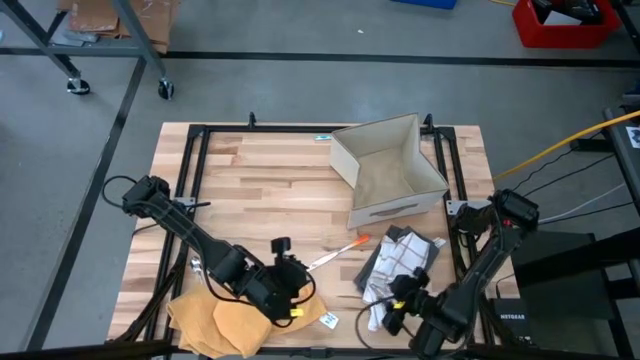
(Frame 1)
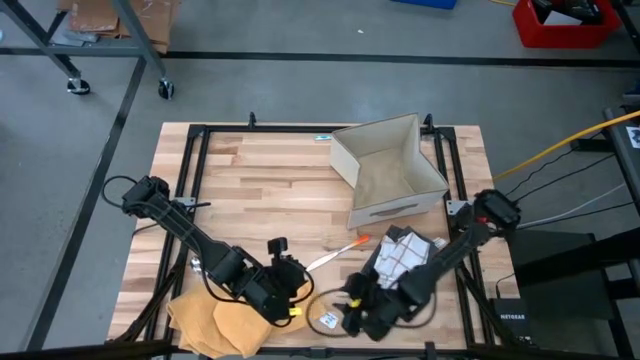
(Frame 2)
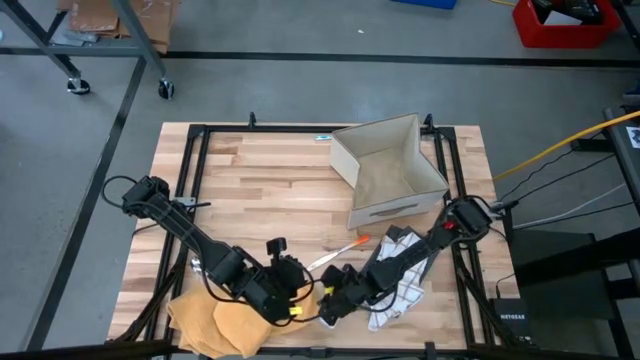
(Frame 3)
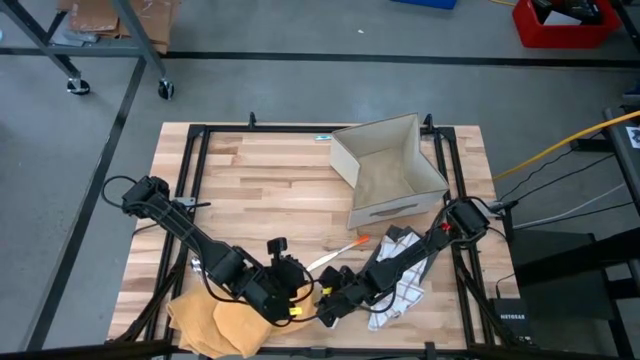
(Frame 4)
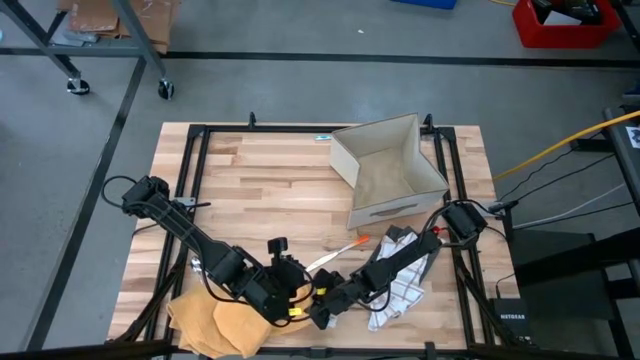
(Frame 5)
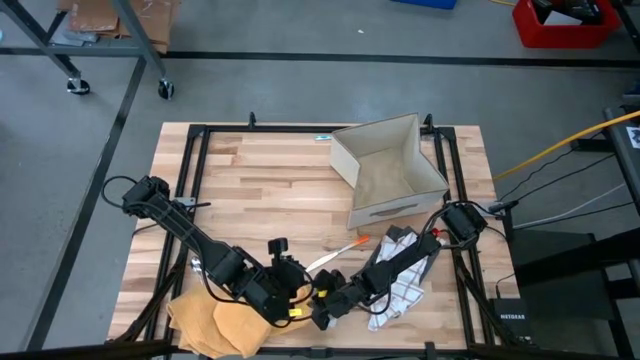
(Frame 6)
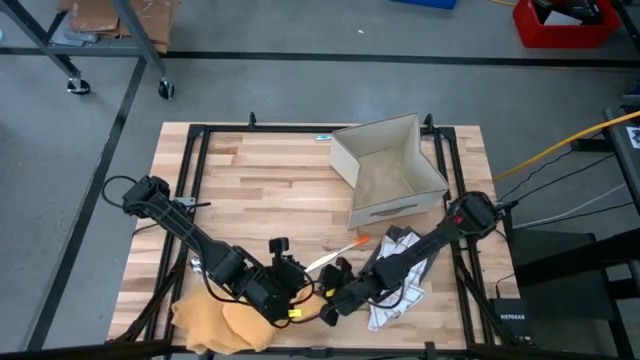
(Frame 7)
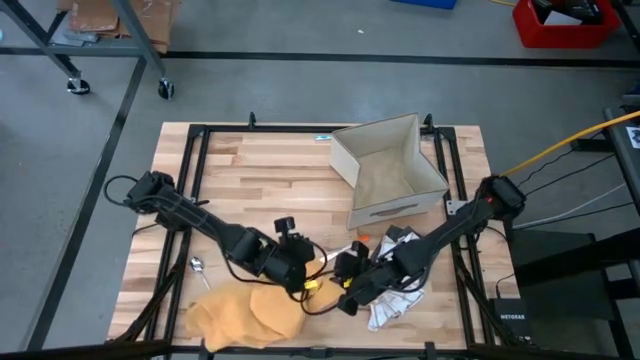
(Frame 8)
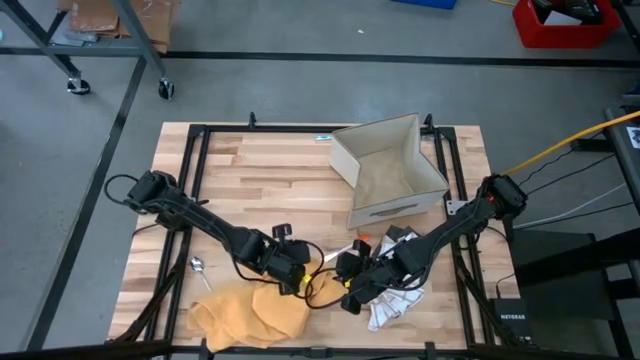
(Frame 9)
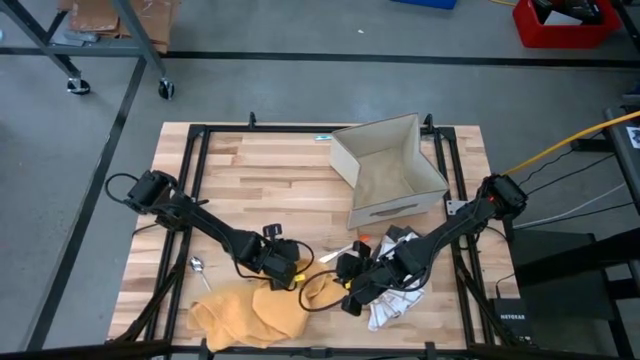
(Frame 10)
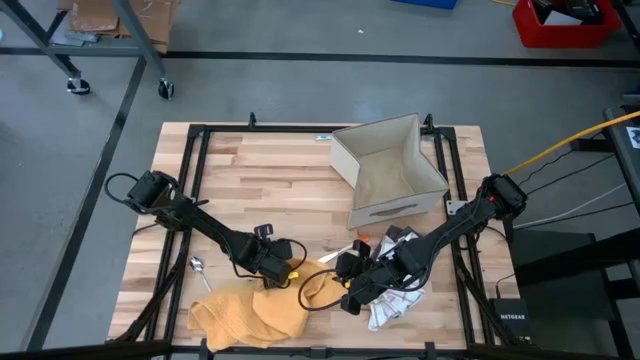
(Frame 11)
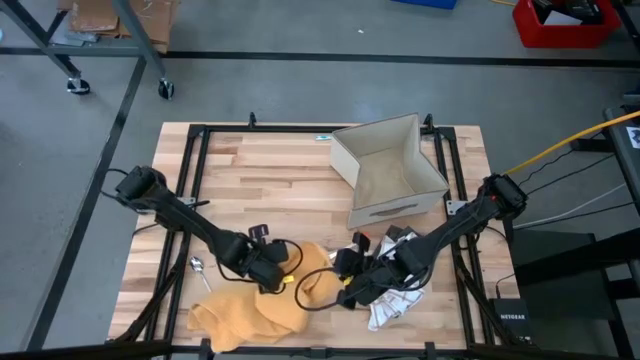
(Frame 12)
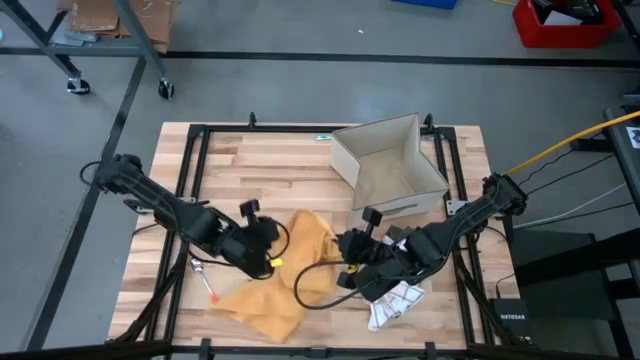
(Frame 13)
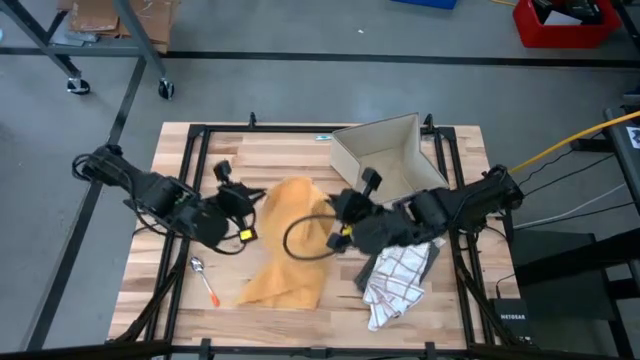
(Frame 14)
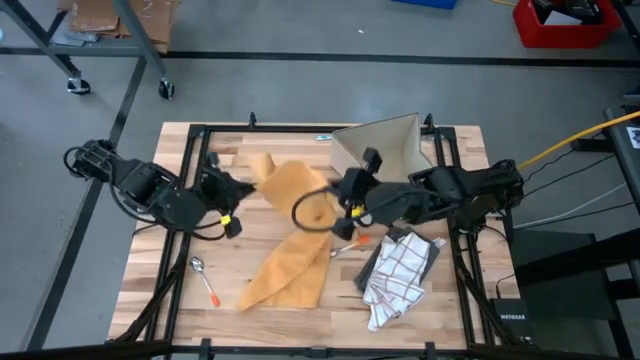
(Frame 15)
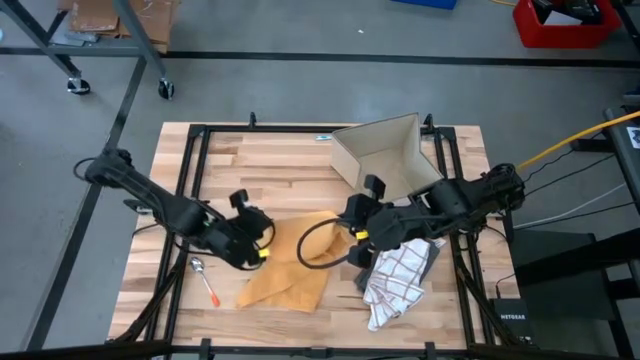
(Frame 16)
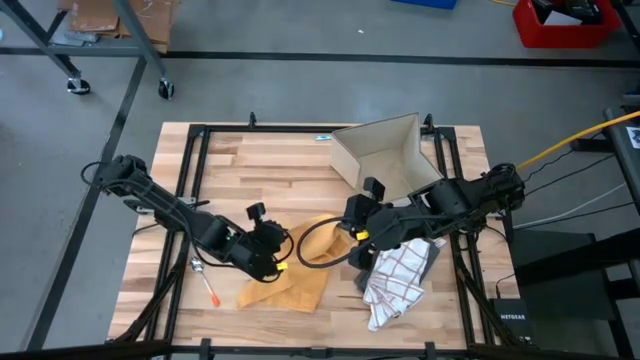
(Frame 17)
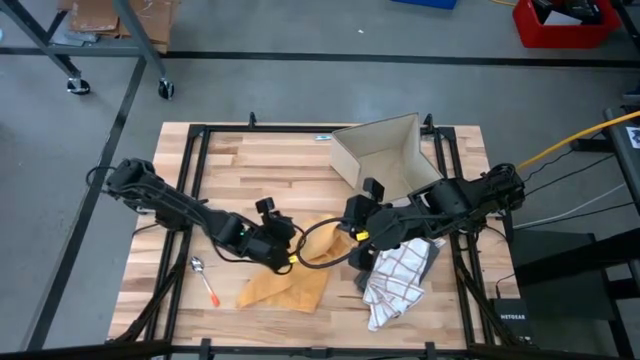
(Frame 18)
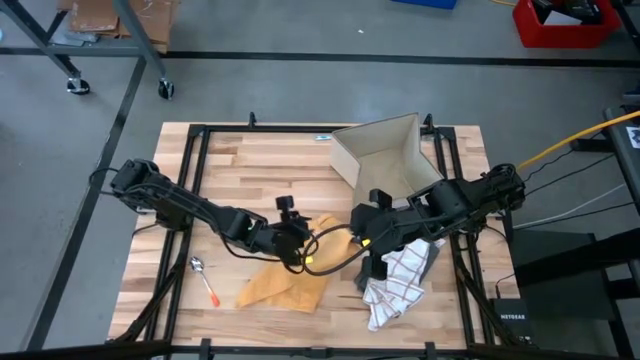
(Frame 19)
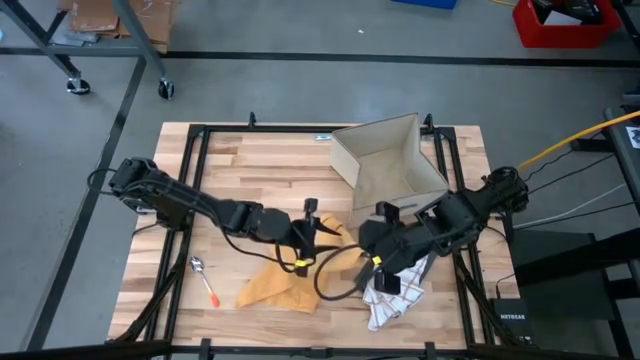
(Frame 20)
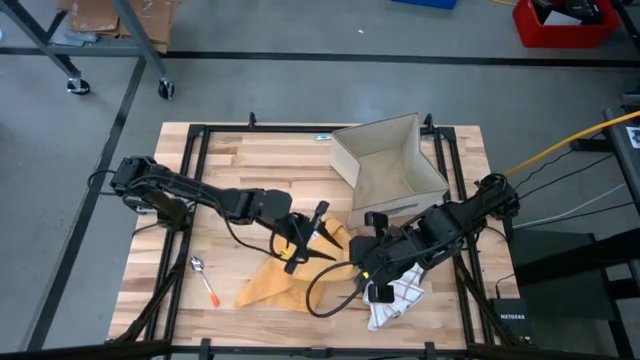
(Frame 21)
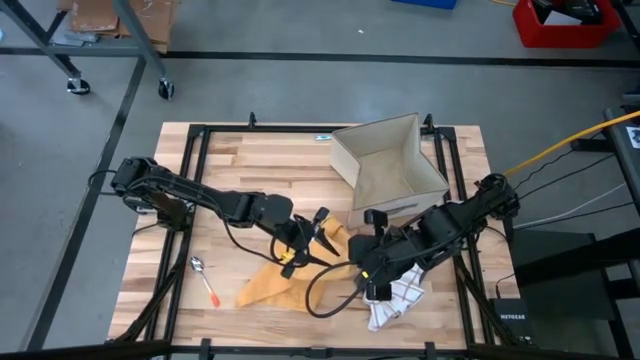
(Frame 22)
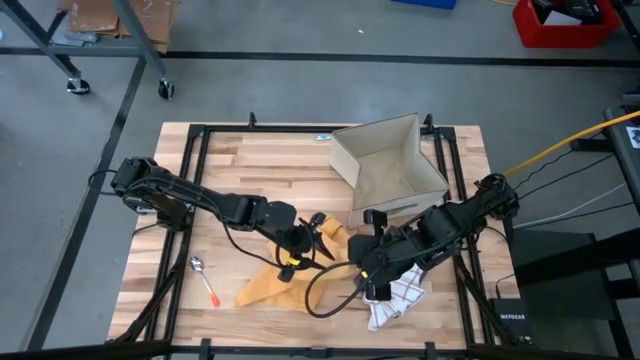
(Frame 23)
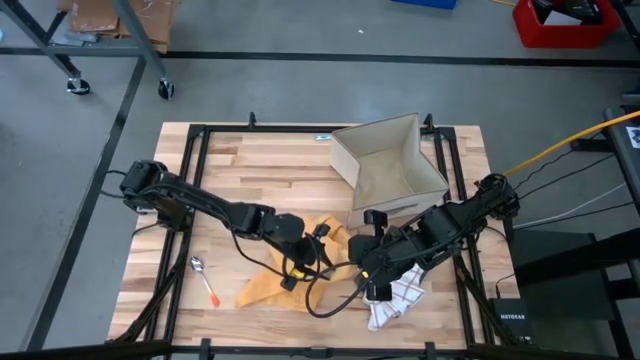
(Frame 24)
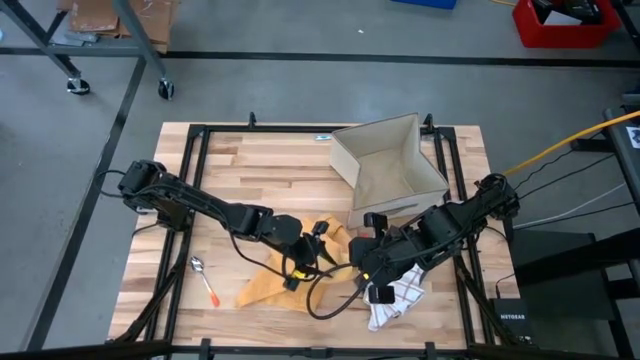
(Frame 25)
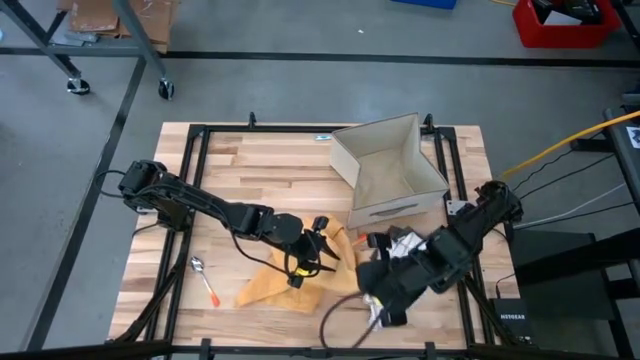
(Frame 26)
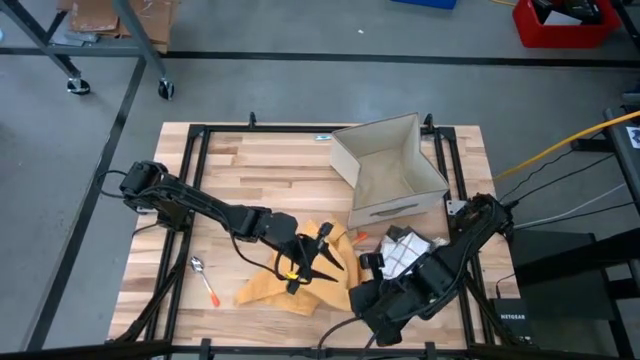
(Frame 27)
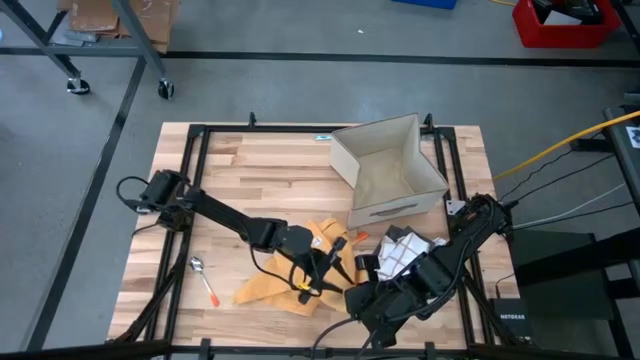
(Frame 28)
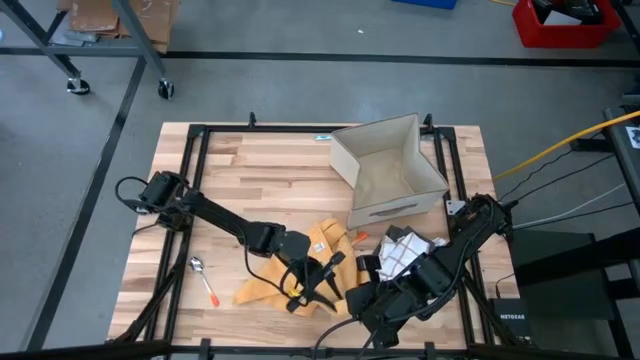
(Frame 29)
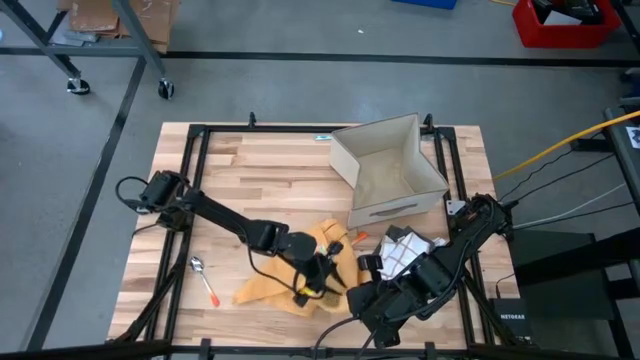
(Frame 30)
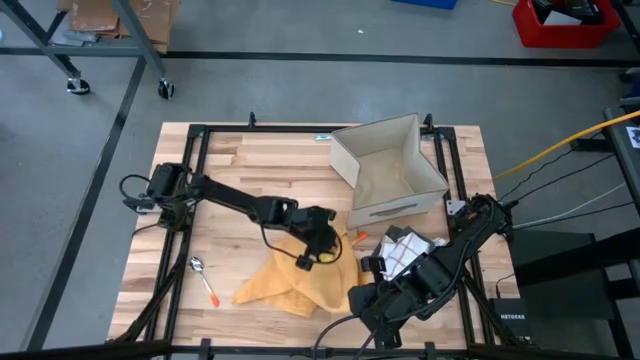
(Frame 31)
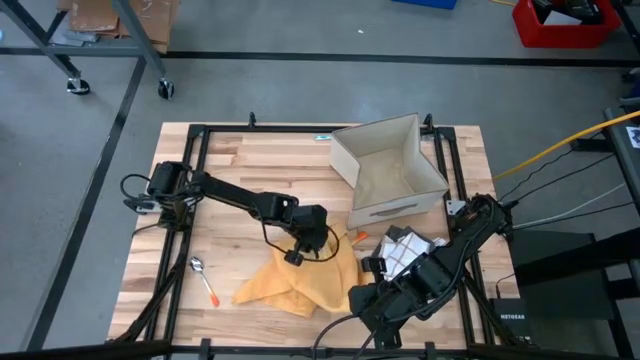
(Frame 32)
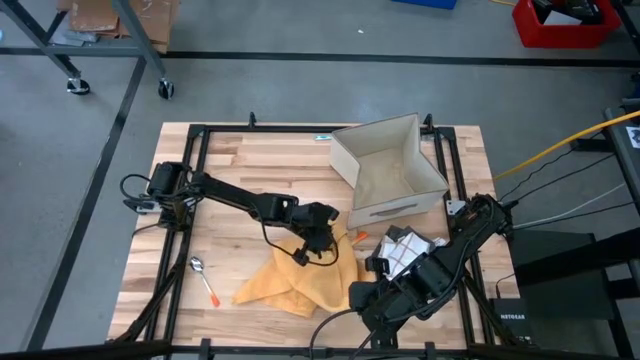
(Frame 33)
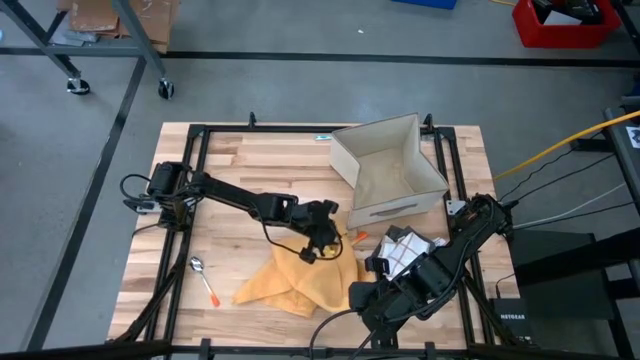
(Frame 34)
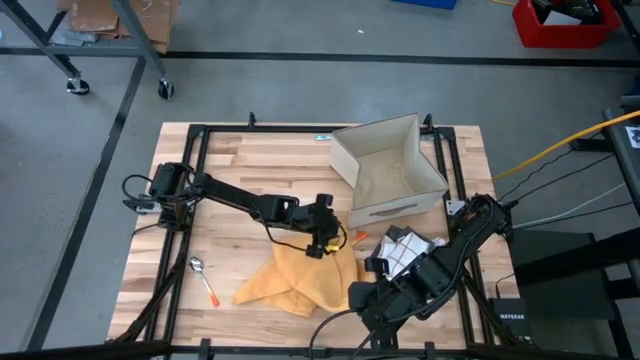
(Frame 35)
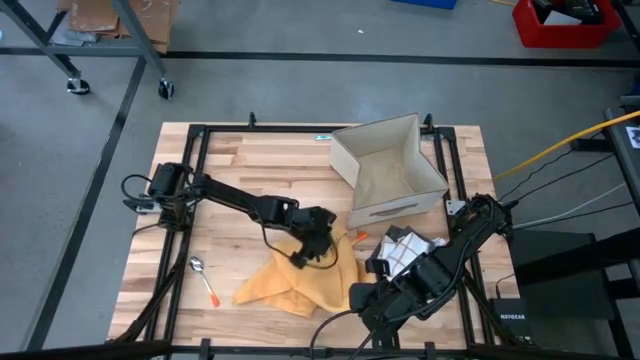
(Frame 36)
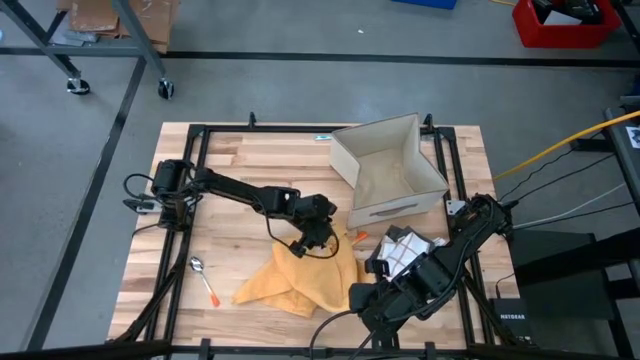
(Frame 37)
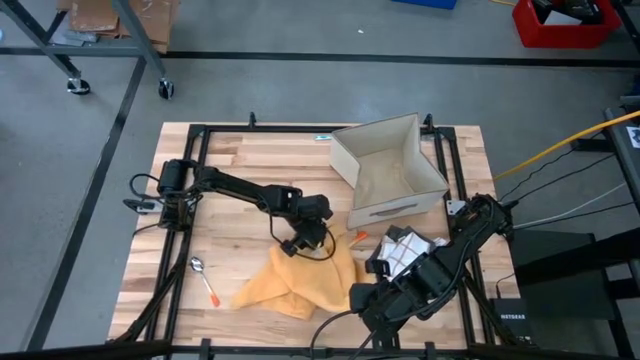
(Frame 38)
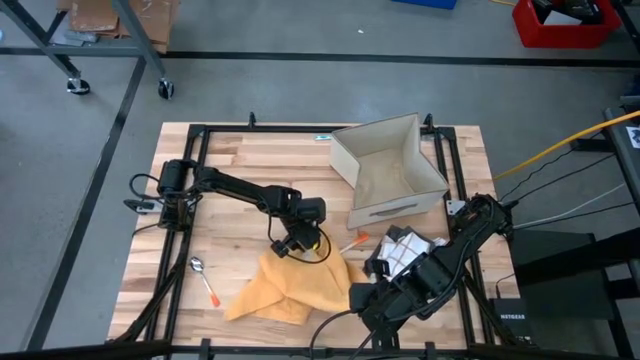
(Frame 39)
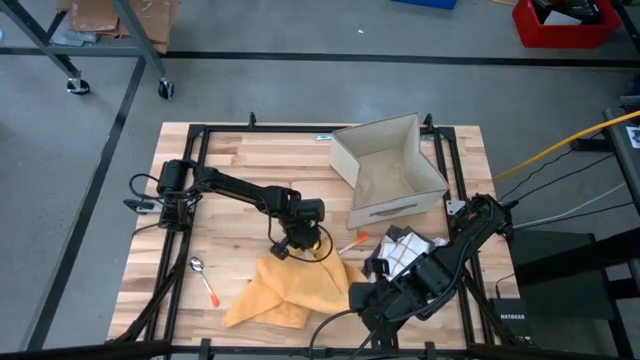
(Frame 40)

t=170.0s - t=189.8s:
Task: Fold towel
Fold the orange kitchen towel
